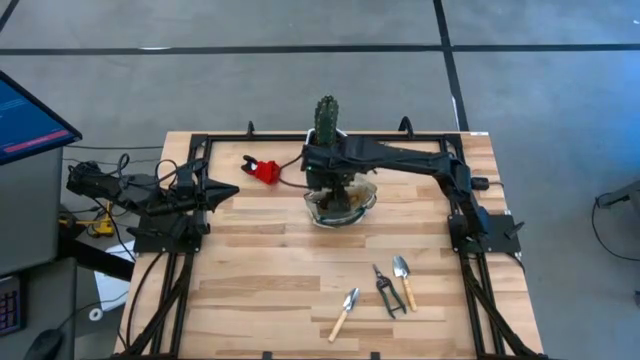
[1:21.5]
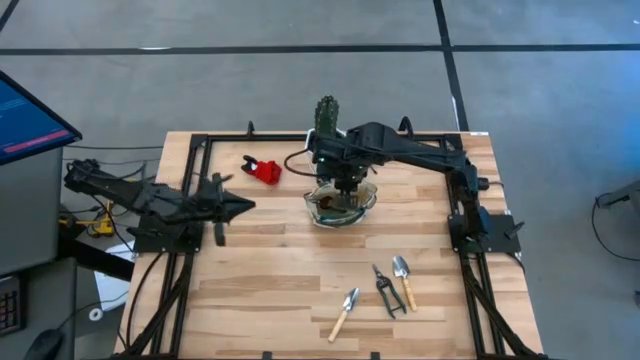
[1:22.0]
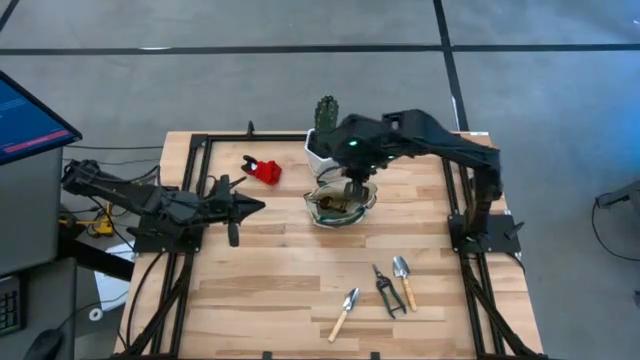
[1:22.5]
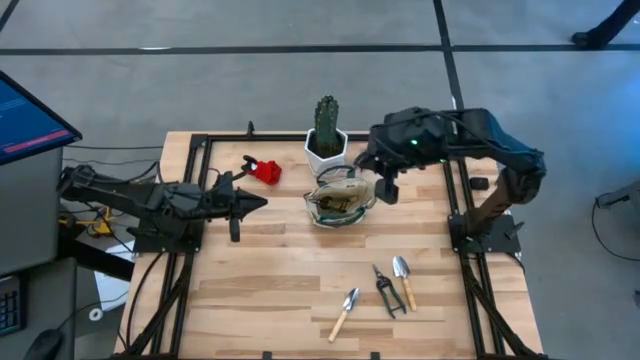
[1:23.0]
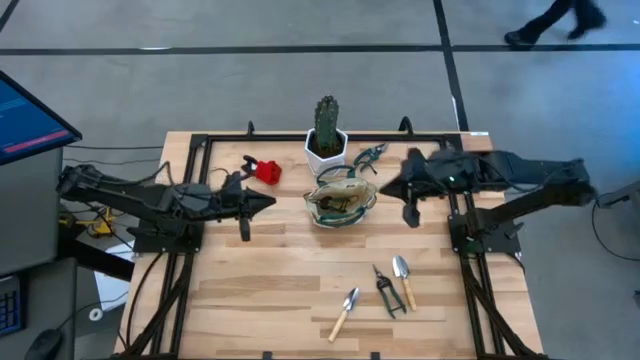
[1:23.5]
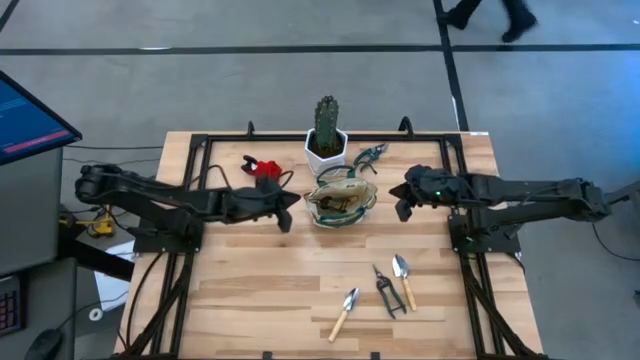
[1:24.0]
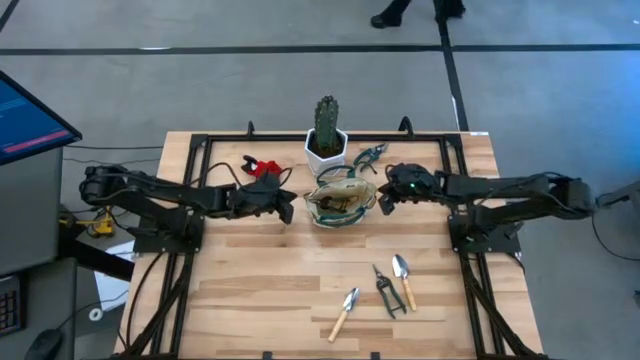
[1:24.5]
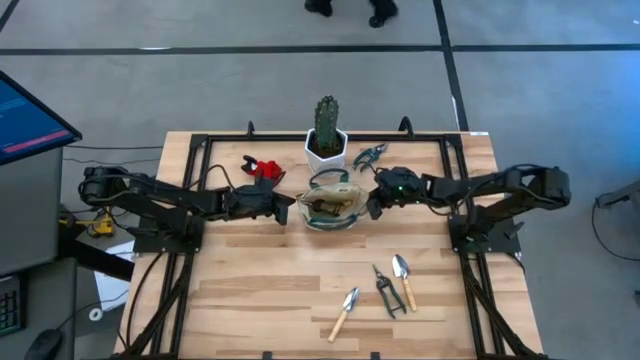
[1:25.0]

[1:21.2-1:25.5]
Task: Pick & Place Garden tools in Gardening bag
Adjust the gardening bag

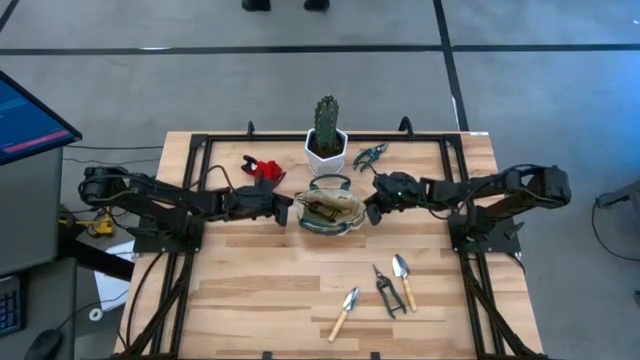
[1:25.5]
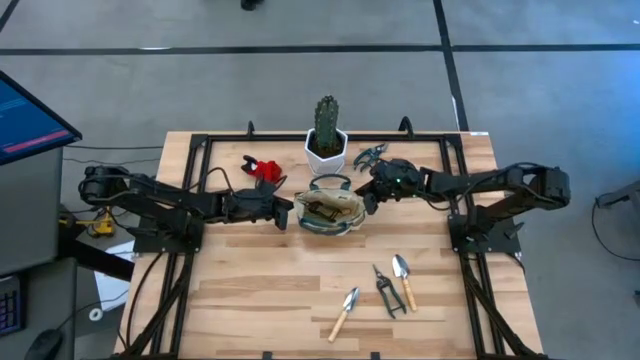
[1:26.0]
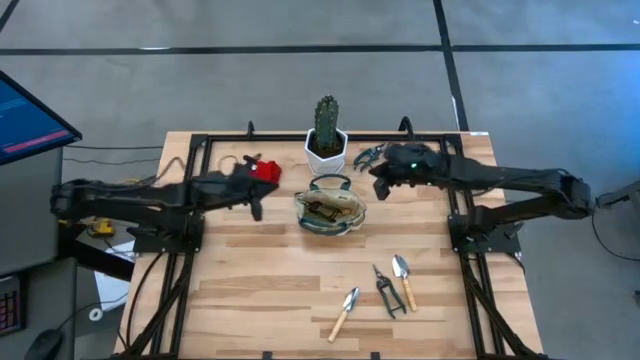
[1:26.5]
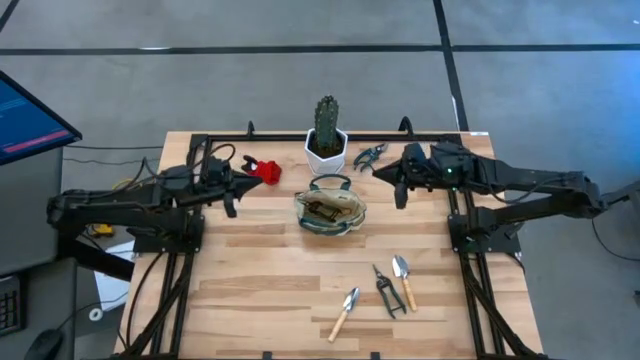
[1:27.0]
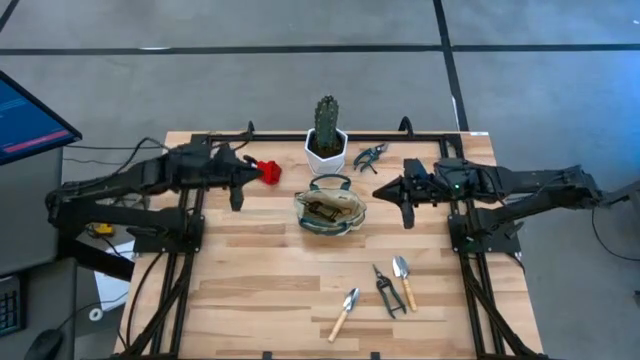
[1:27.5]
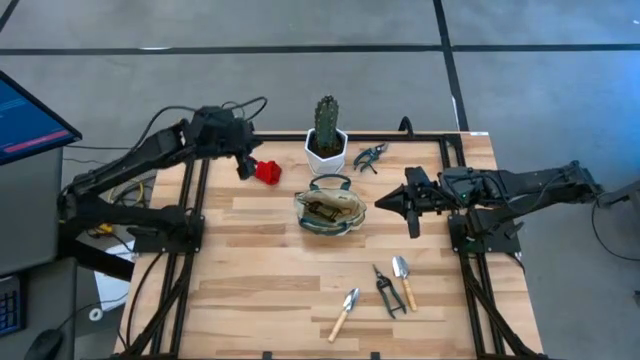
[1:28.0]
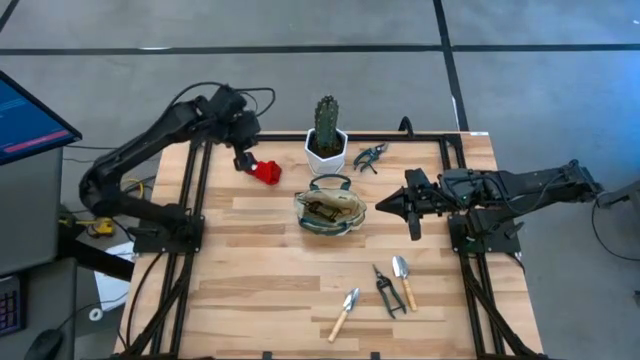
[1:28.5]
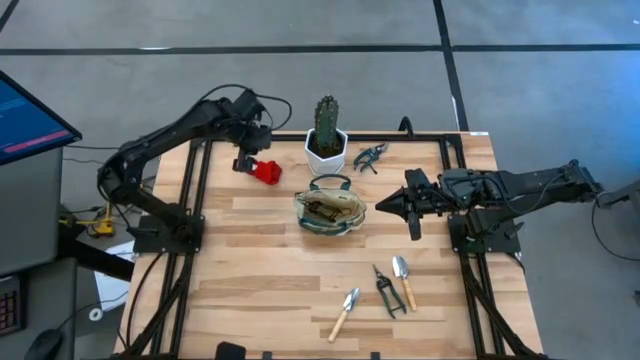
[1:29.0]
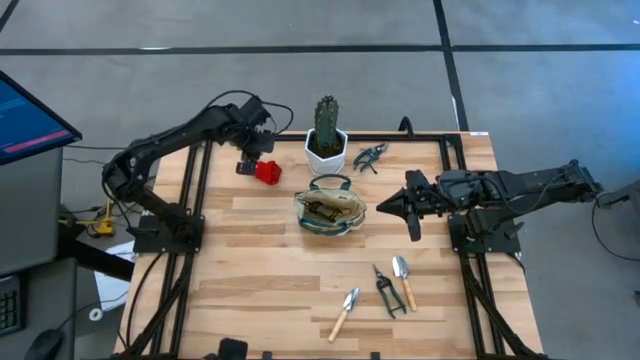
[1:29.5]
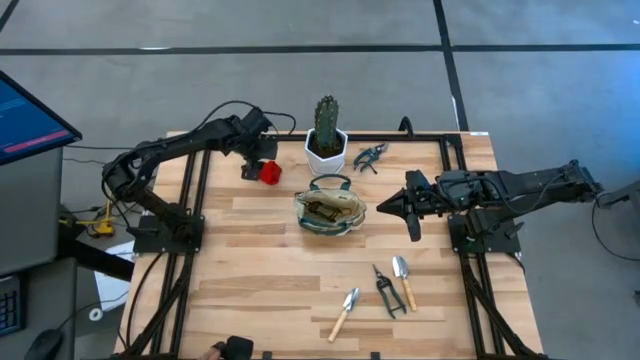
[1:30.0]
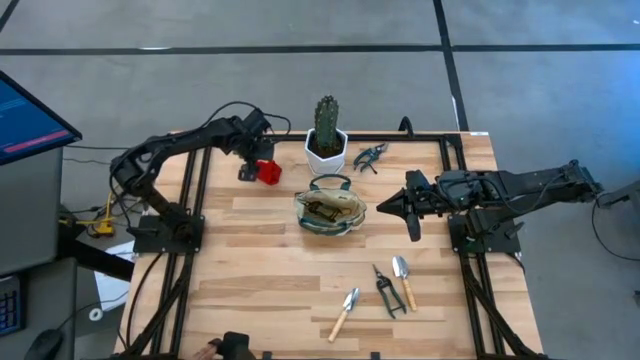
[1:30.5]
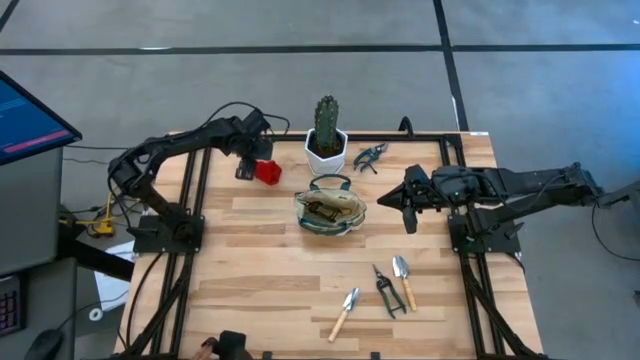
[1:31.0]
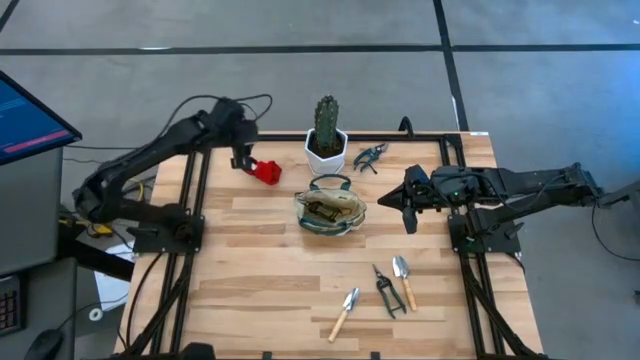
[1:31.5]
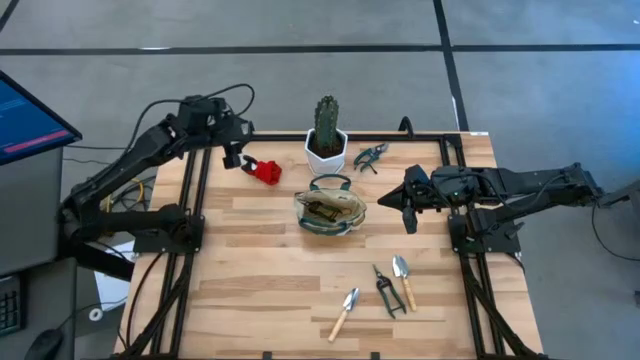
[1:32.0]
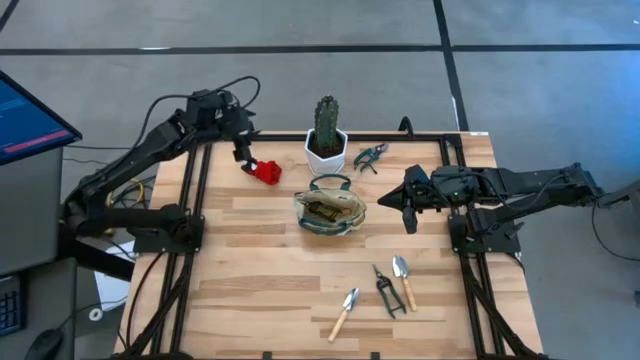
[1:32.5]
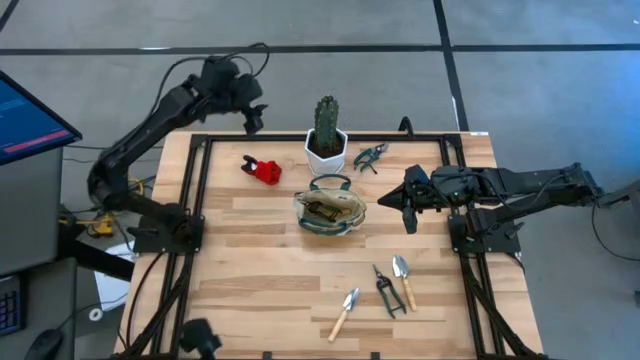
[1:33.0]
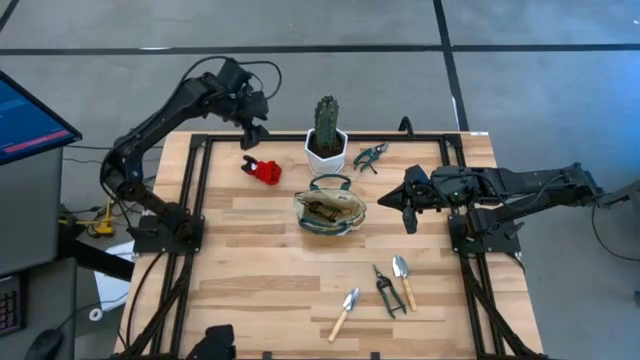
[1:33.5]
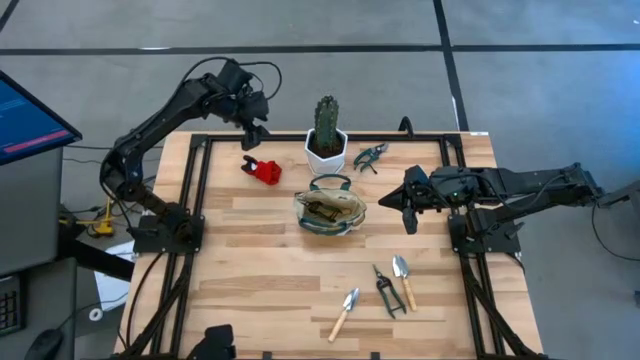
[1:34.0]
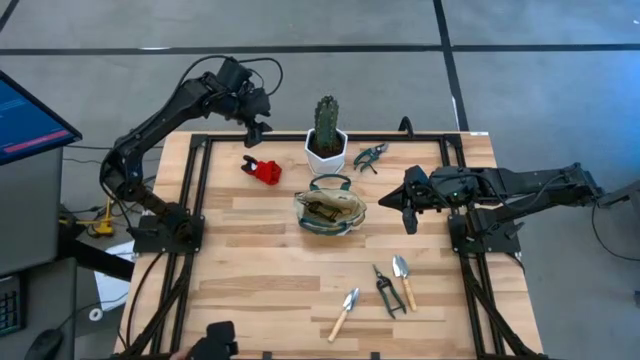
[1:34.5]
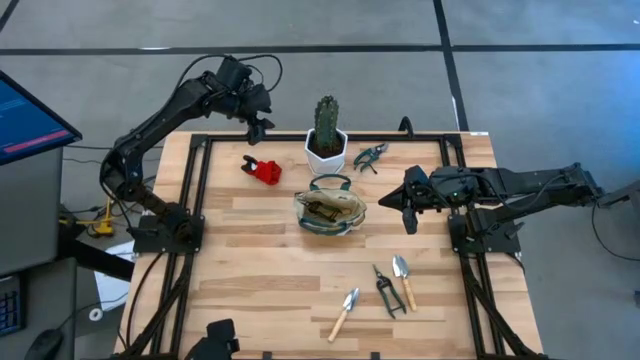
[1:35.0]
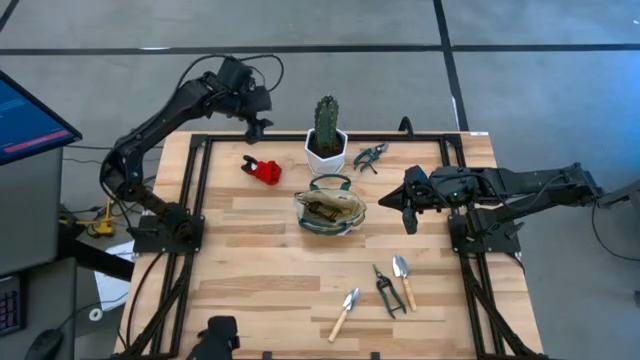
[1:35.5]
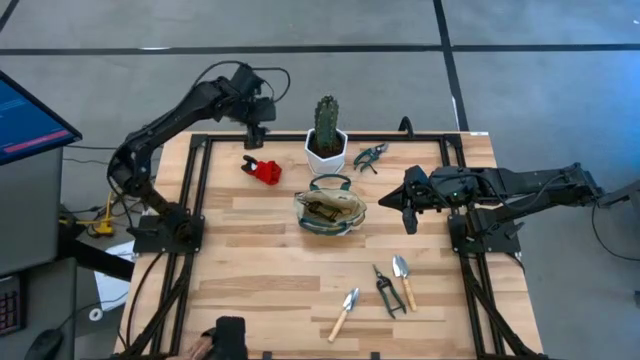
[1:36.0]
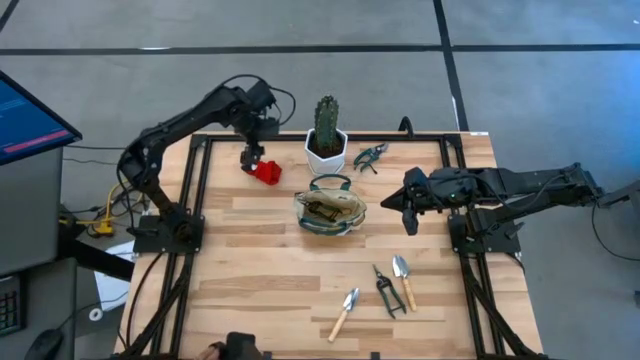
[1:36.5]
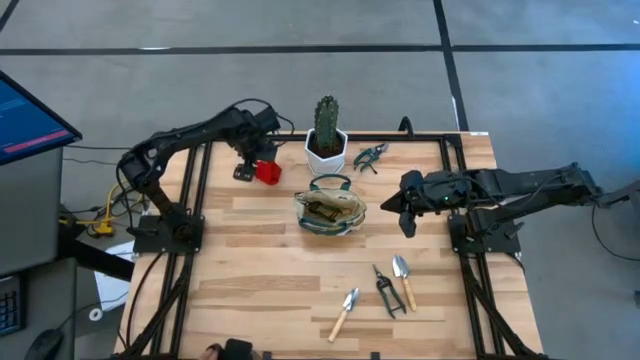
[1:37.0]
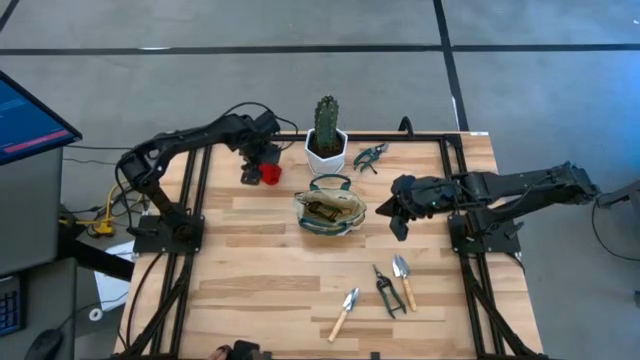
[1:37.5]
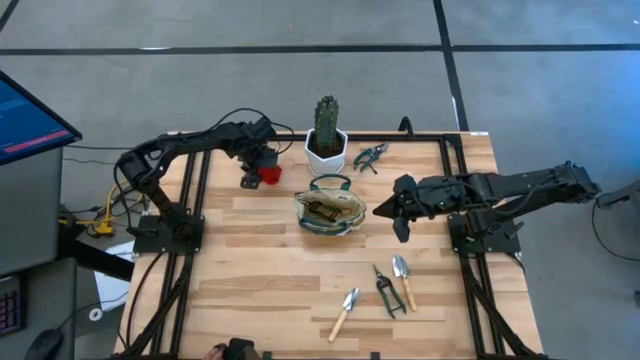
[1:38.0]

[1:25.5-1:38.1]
Put the red gloves into the gardening bag

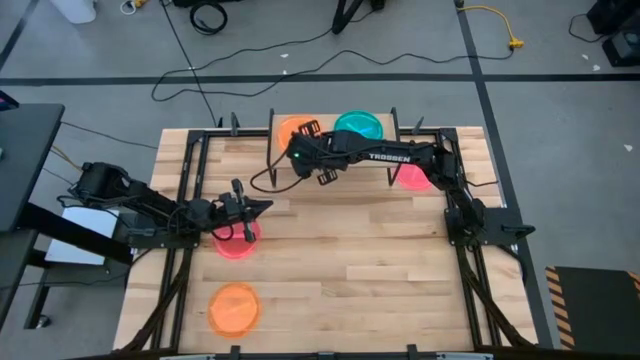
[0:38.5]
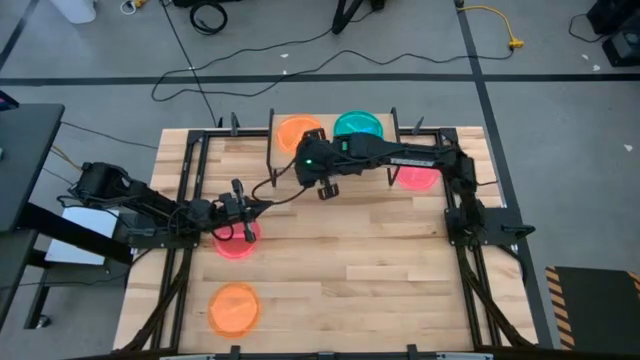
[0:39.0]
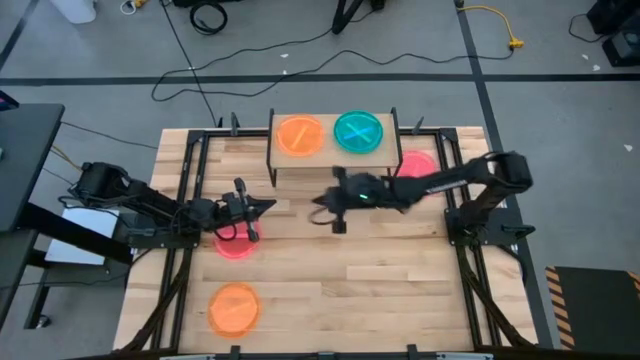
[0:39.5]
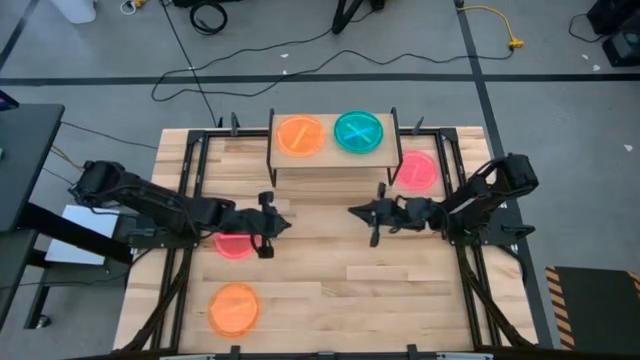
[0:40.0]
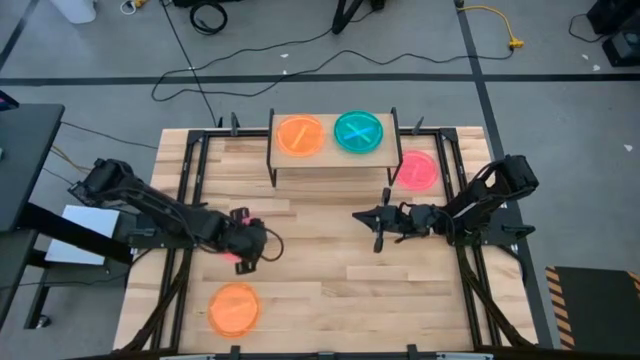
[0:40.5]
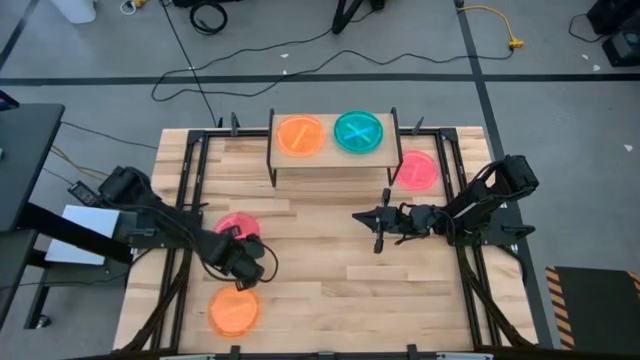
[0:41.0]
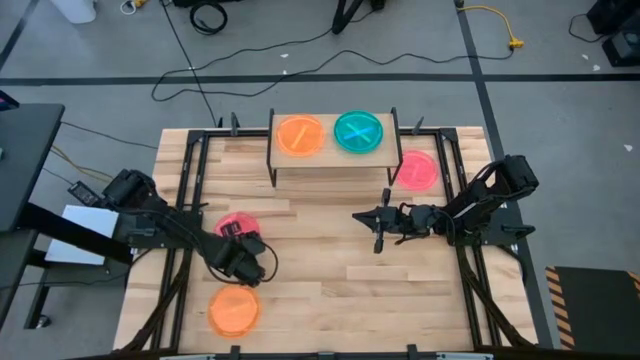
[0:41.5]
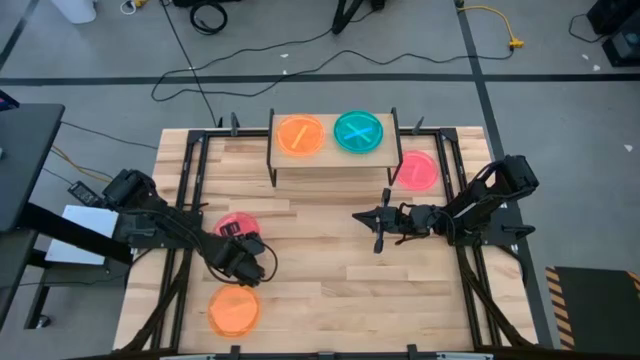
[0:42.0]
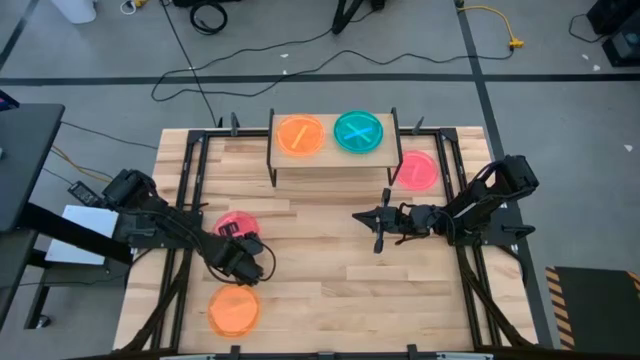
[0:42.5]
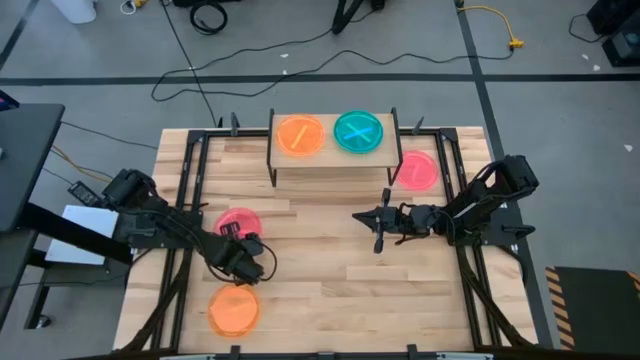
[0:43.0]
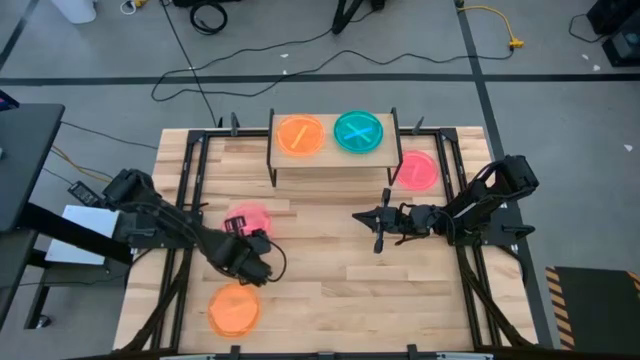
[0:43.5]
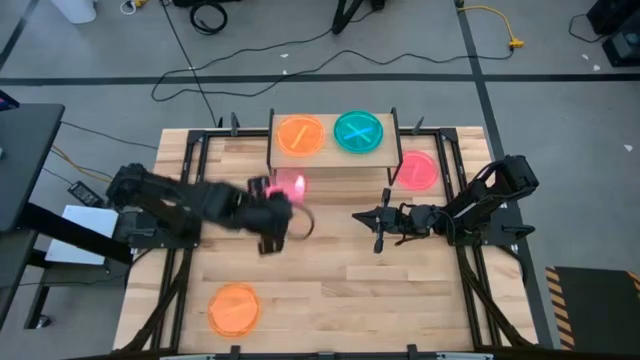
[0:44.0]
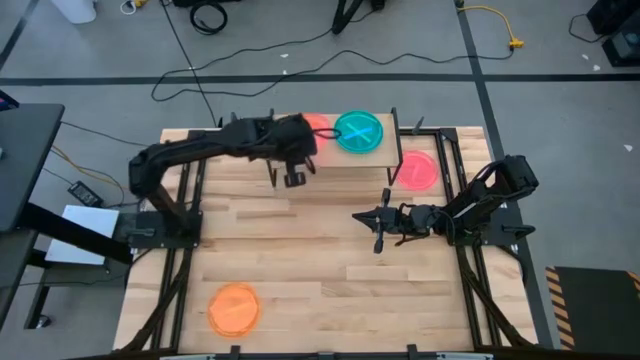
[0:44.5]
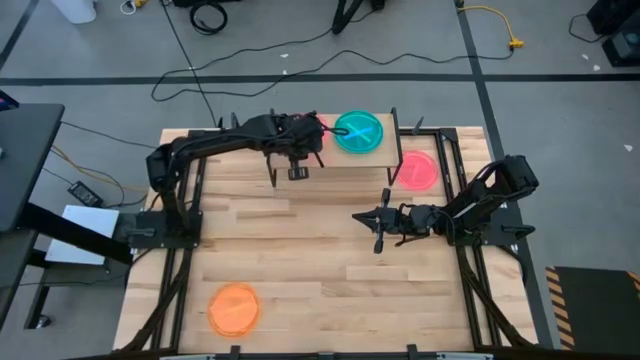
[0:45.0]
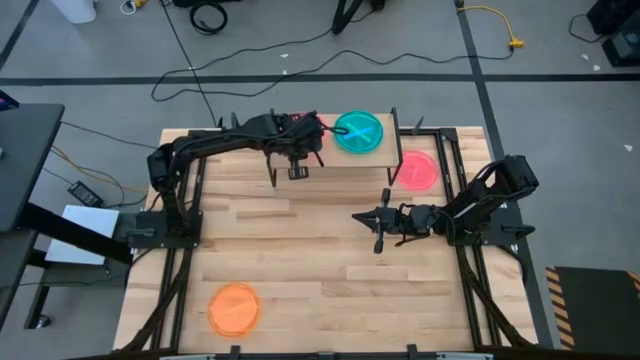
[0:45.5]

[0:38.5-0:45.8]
Task: Place and stack plates onto a shelf
Stack the bottom red plate on top of the orange plate on the shelf
